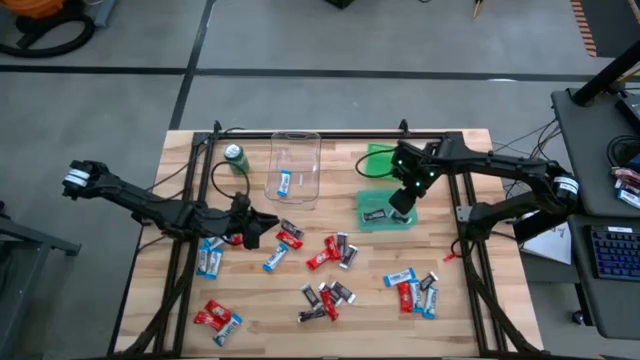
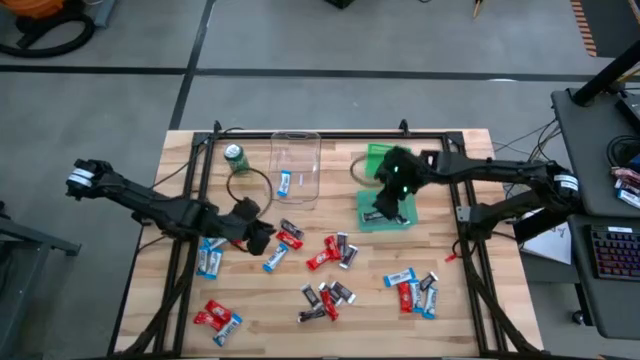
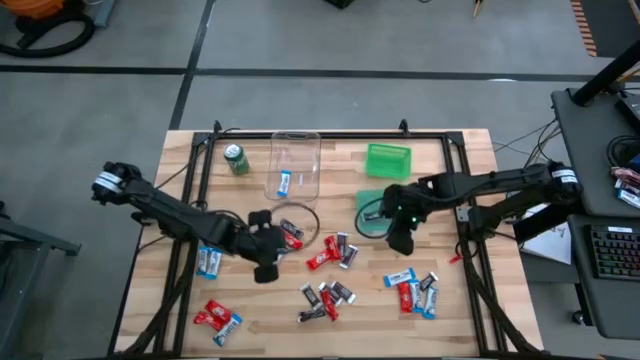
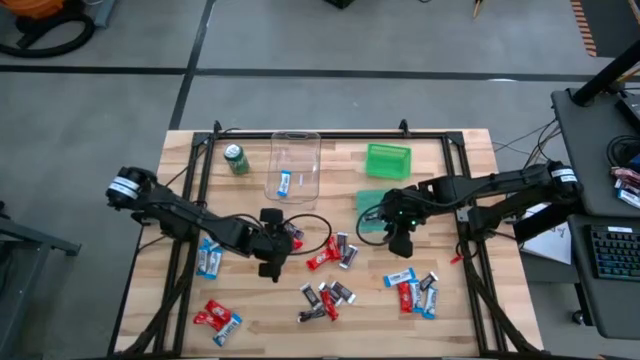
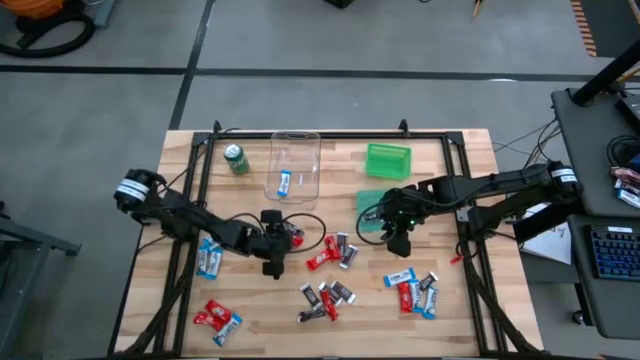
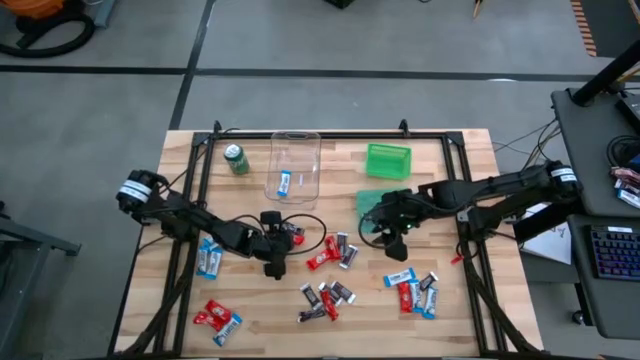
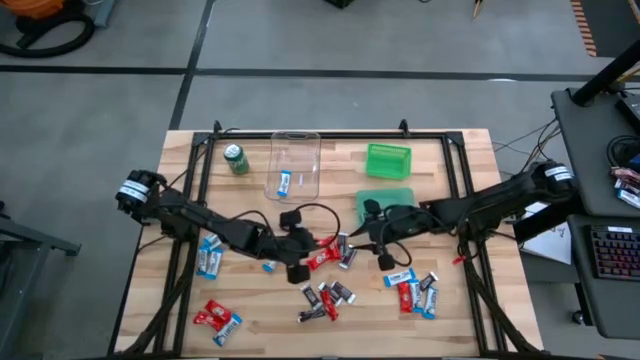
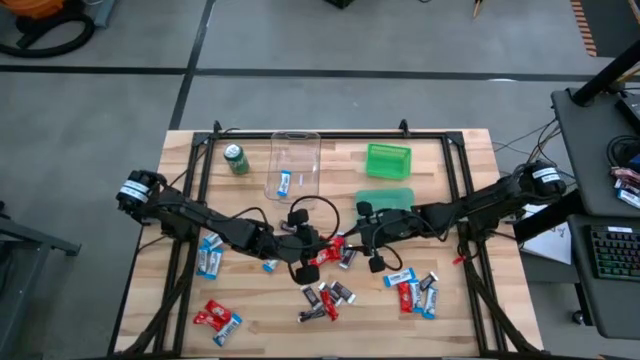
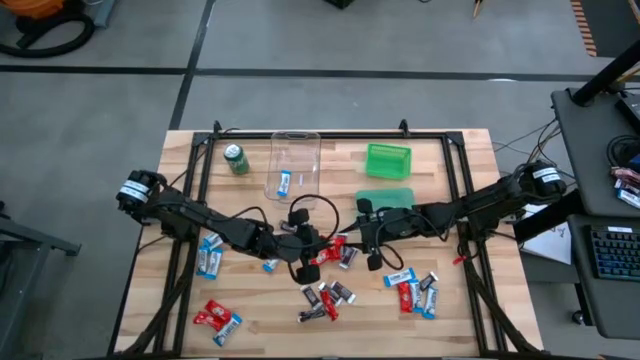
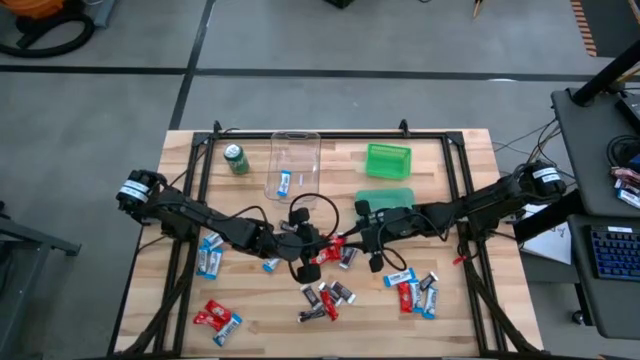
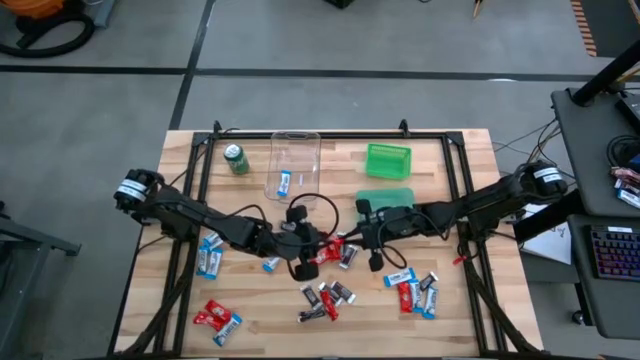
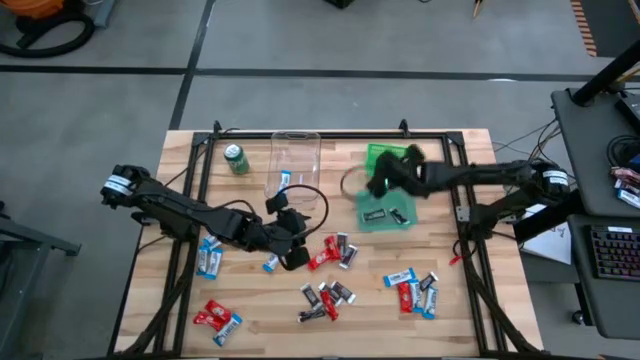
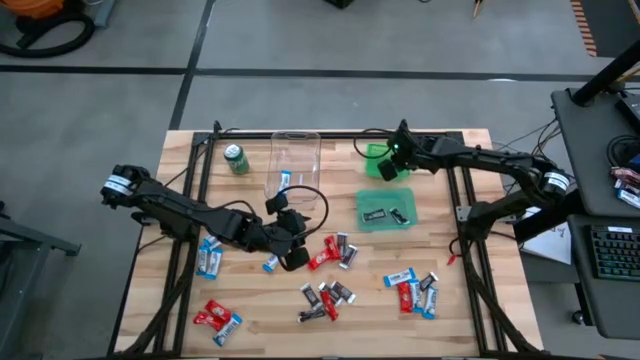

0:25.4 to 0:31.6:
Task: Sort candy
Put the red candy into the green bin

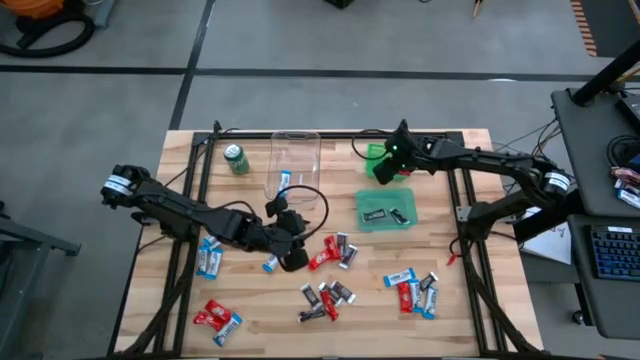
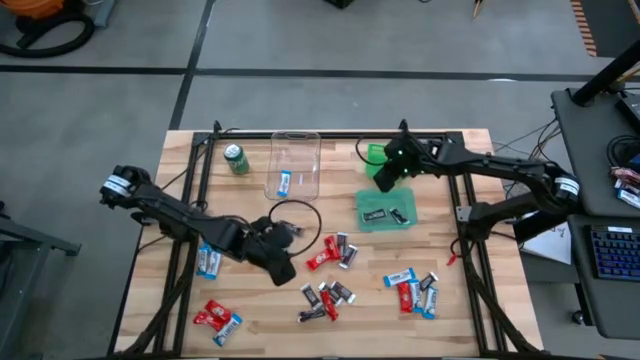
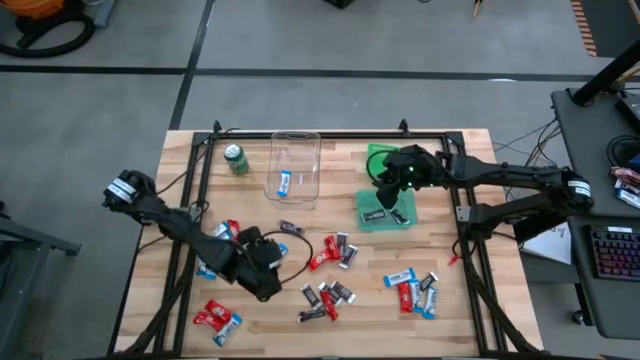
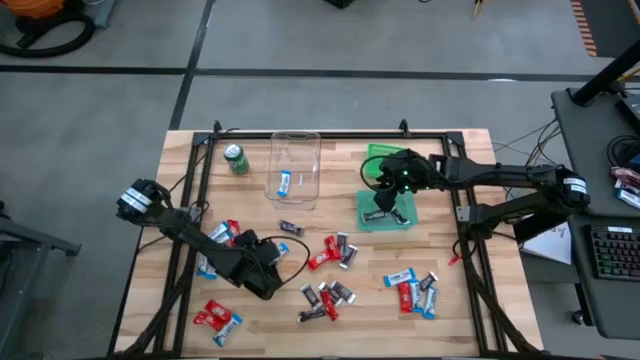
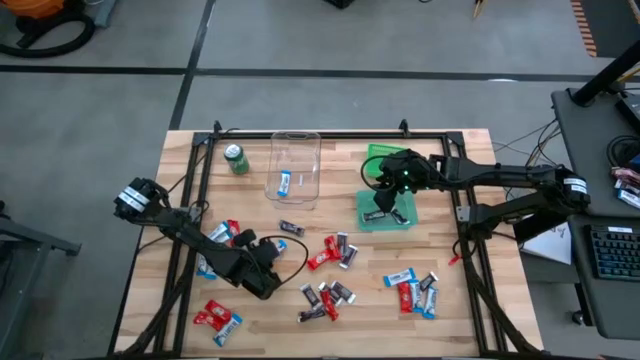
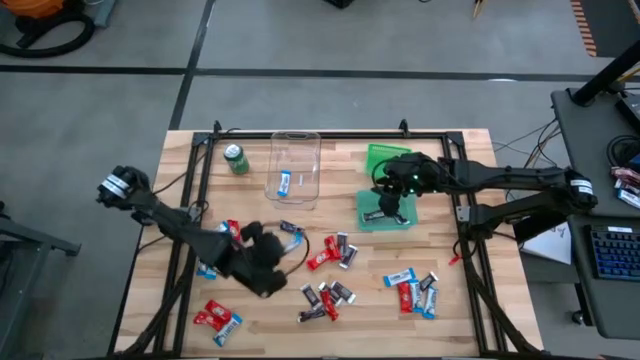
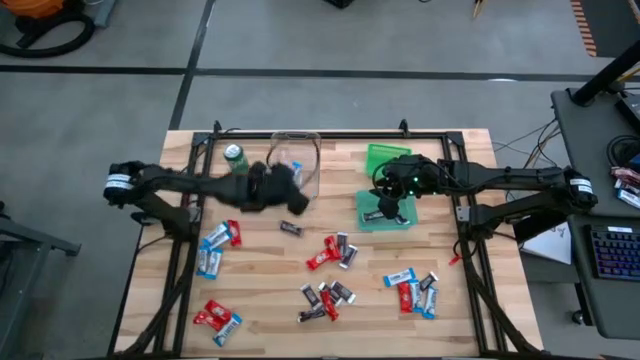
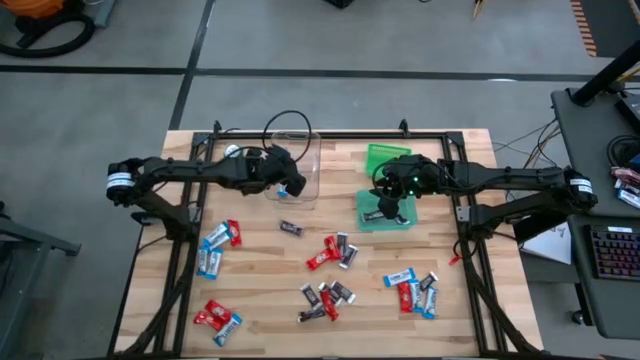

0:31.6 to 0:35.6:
Put the white candy into the transparent bin

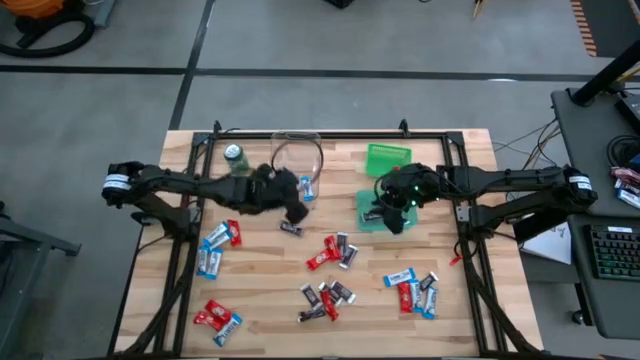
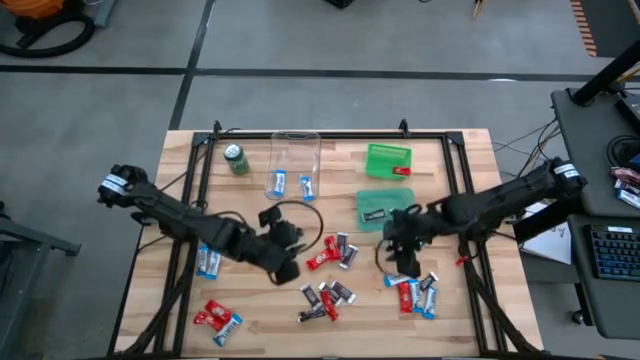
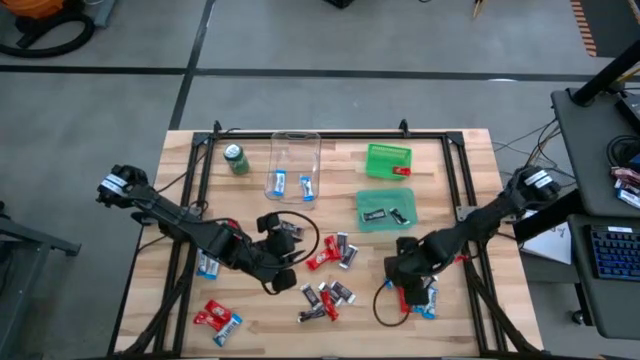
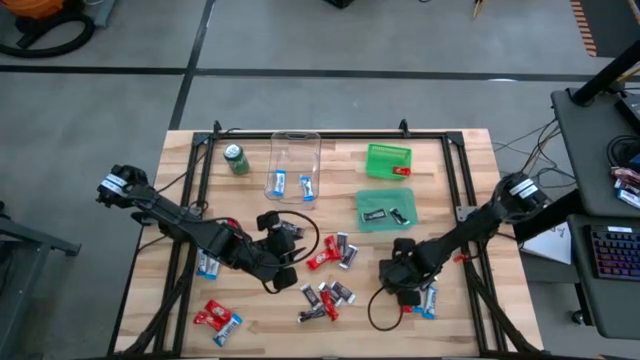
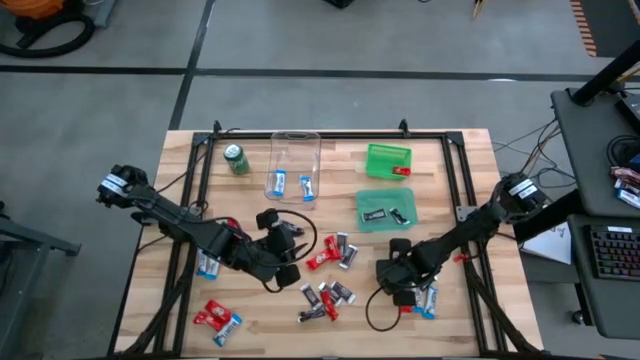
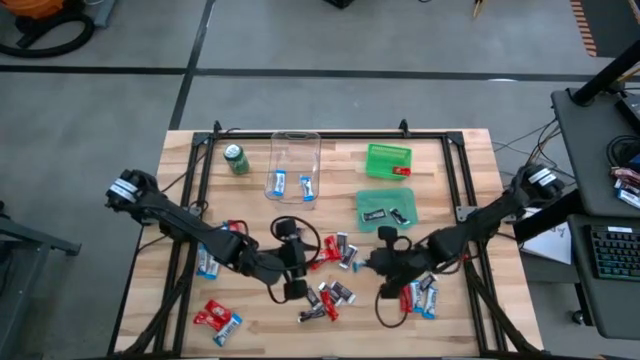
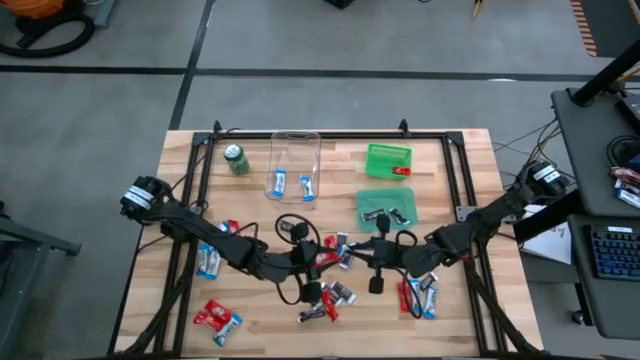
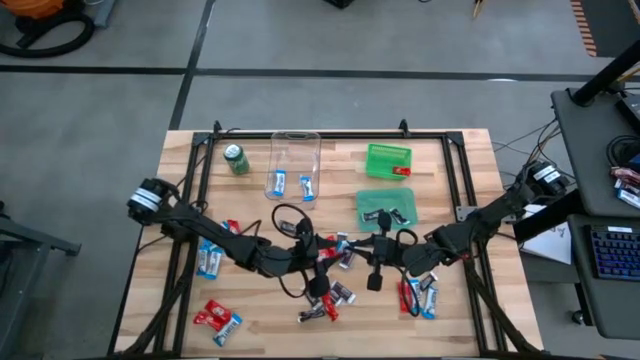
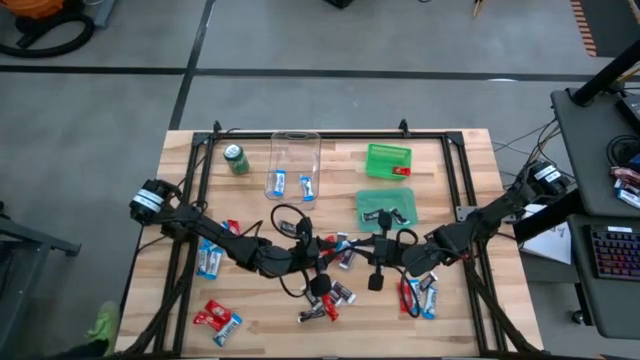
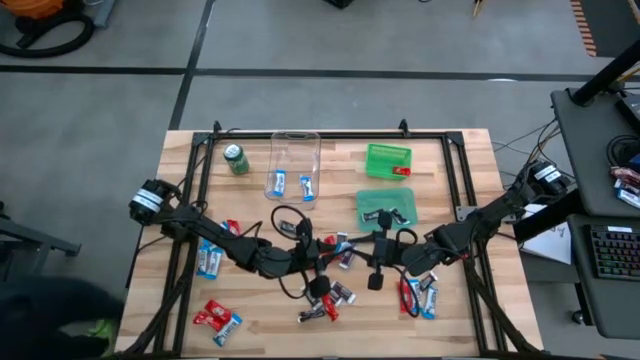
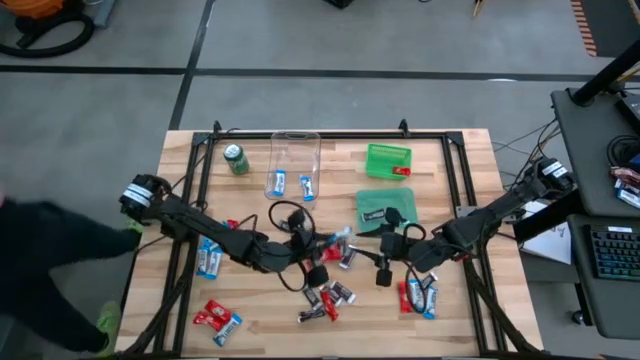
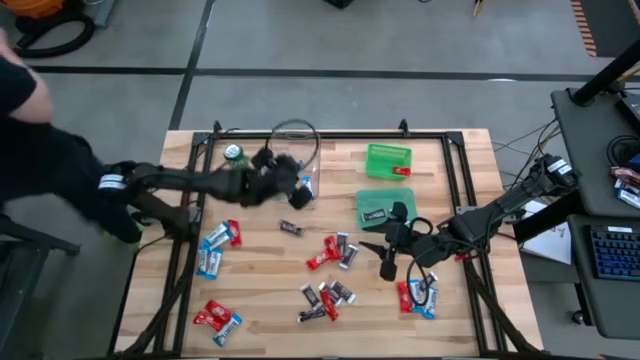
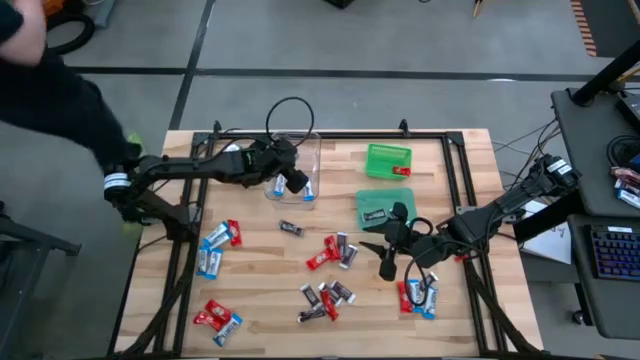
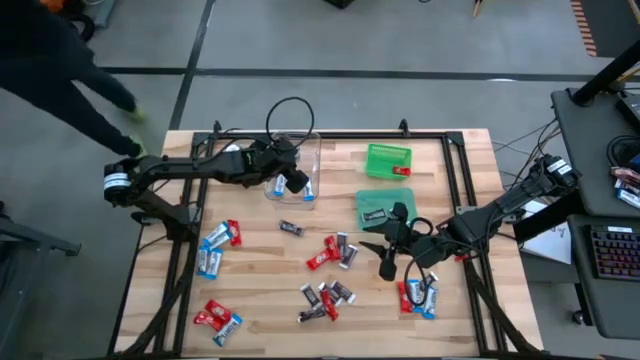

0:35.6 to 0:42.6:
Put the white candy into the transparent bin

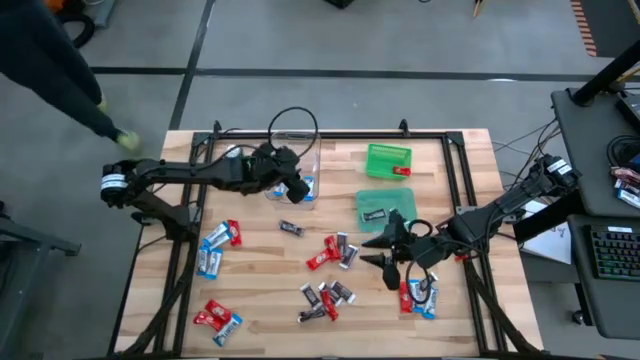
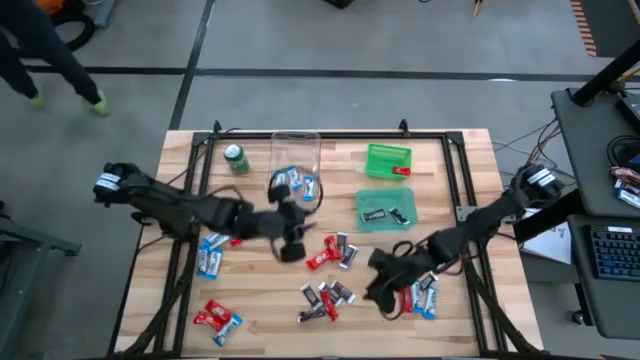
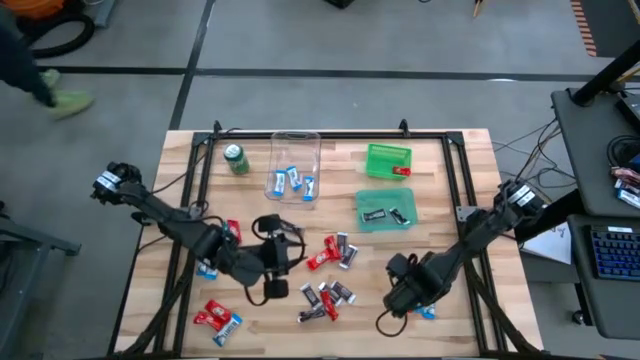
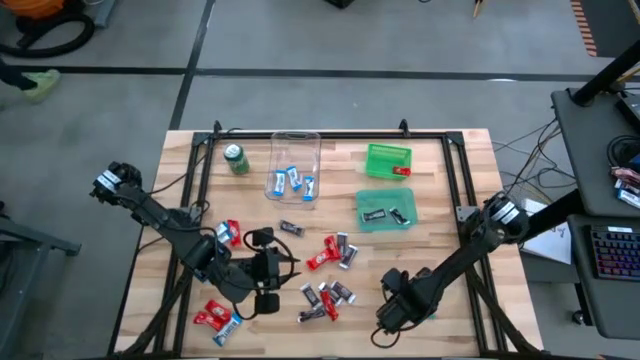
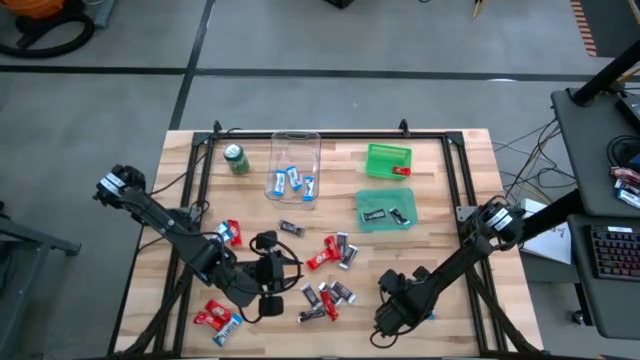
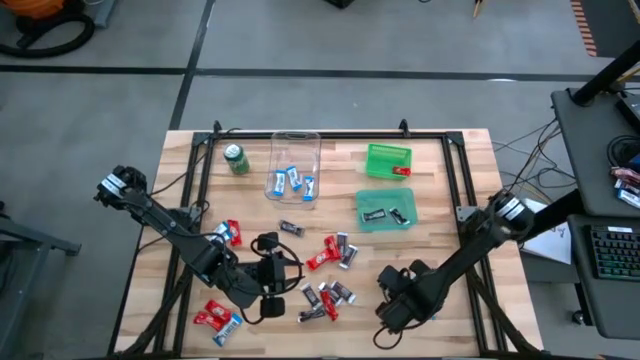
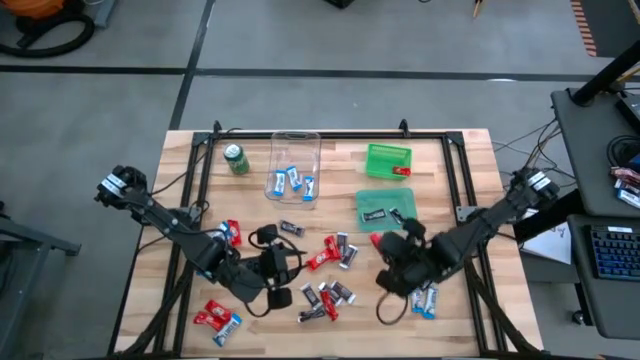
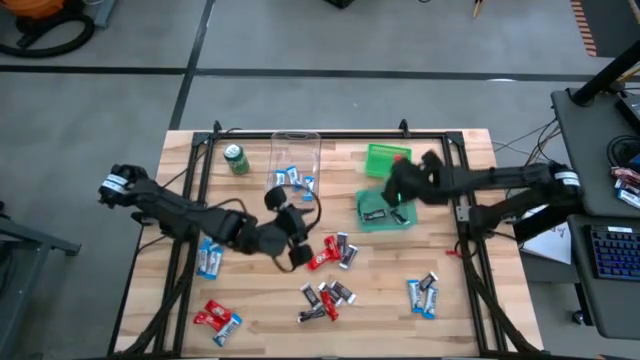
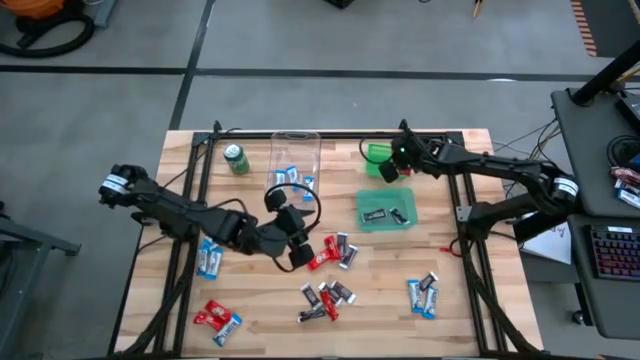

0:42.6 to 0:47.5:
Put the red candy into the green bin
